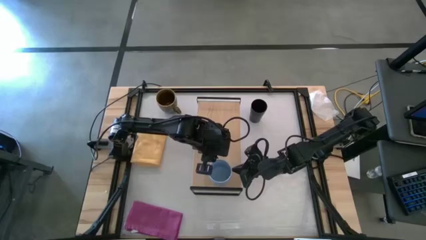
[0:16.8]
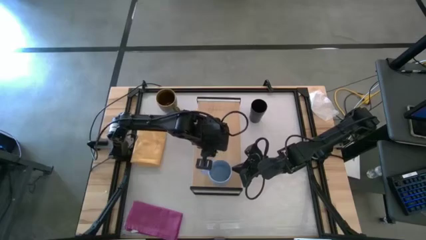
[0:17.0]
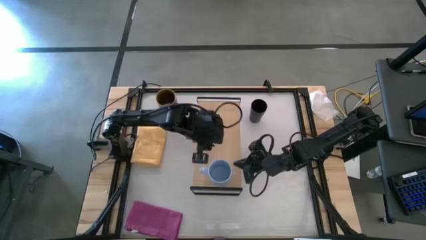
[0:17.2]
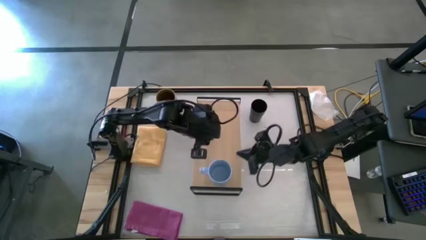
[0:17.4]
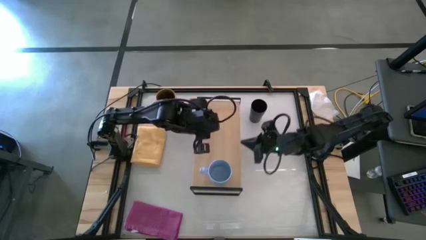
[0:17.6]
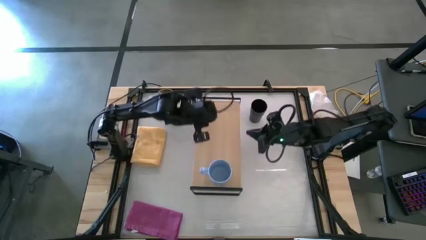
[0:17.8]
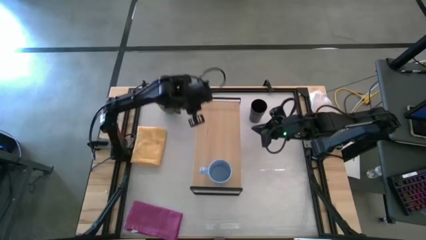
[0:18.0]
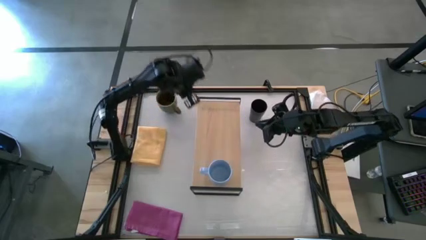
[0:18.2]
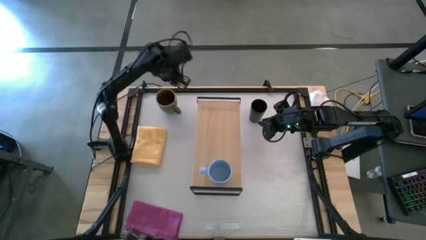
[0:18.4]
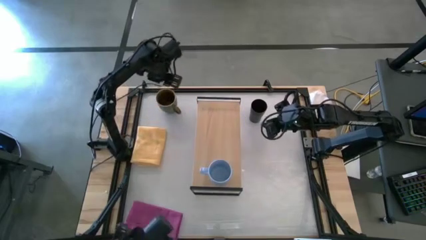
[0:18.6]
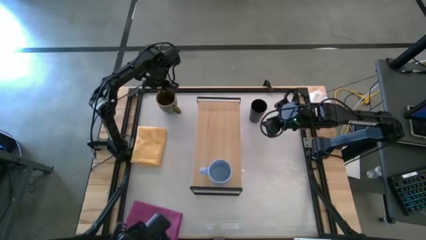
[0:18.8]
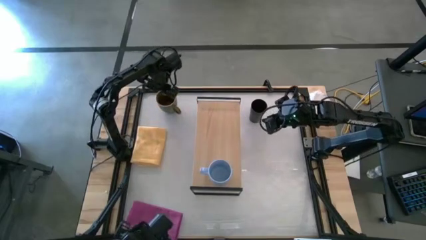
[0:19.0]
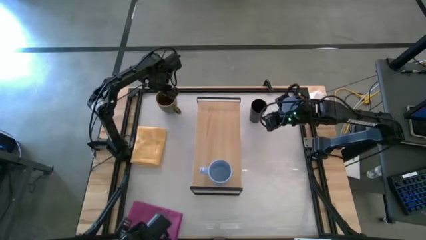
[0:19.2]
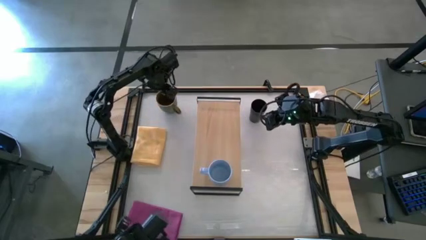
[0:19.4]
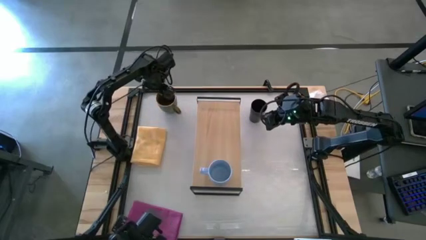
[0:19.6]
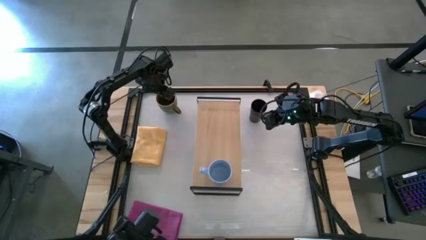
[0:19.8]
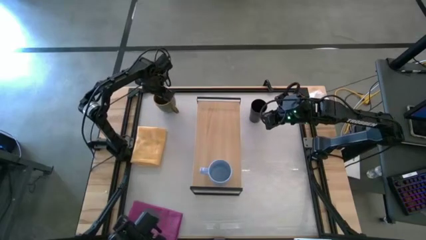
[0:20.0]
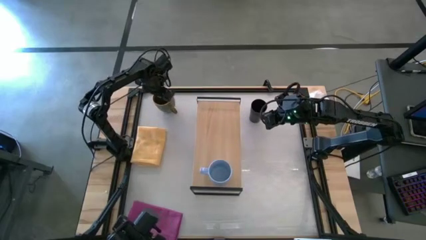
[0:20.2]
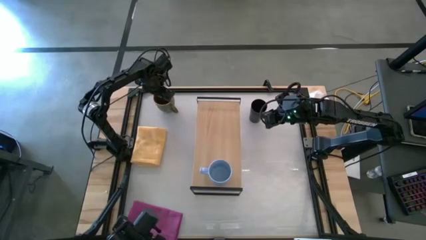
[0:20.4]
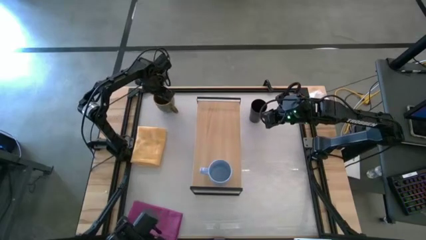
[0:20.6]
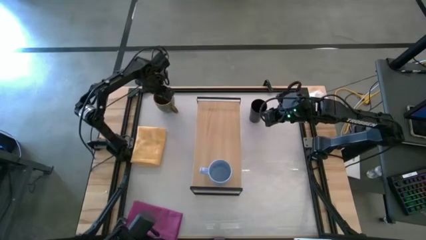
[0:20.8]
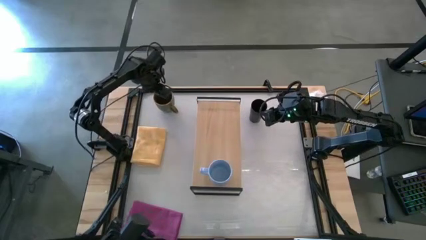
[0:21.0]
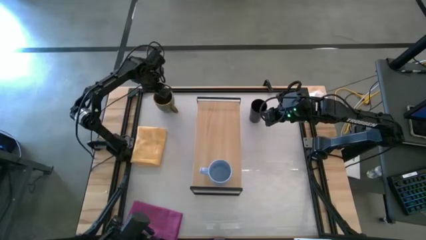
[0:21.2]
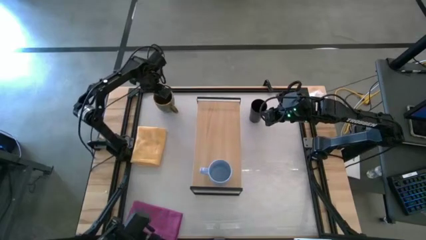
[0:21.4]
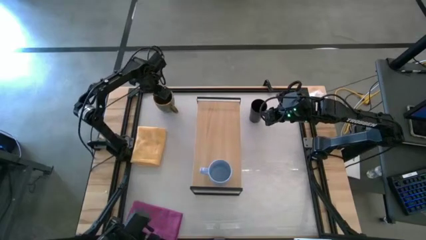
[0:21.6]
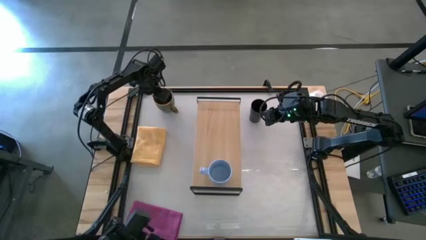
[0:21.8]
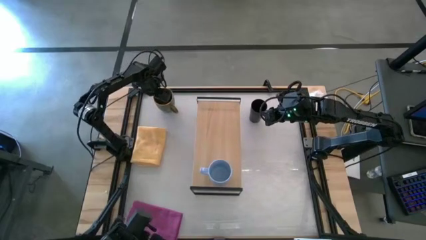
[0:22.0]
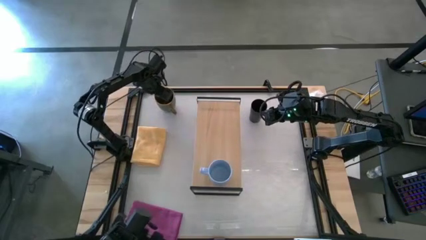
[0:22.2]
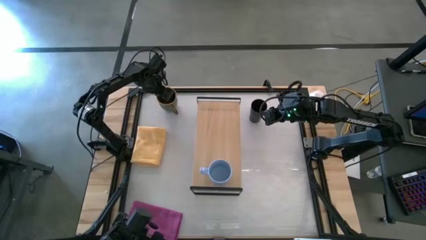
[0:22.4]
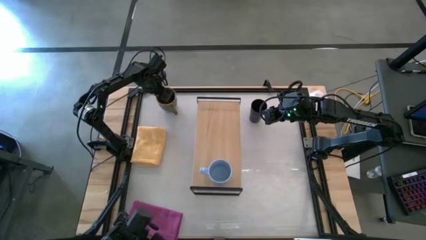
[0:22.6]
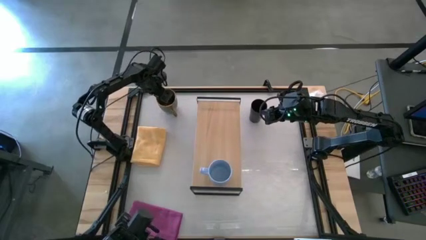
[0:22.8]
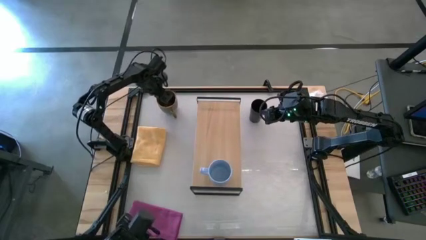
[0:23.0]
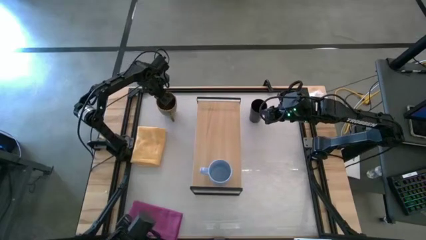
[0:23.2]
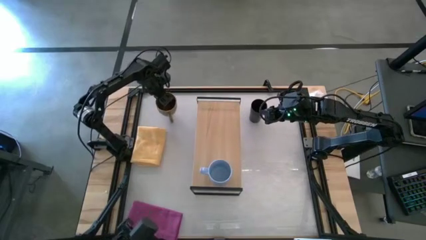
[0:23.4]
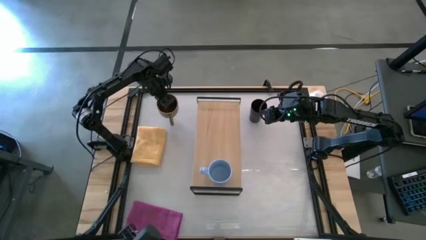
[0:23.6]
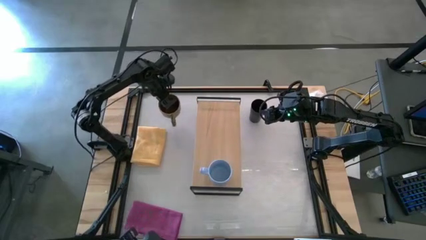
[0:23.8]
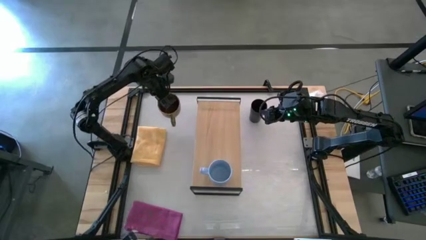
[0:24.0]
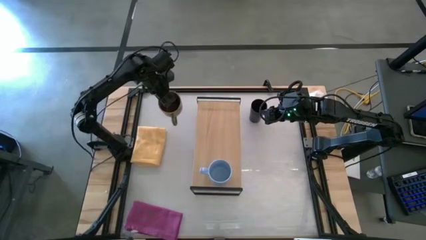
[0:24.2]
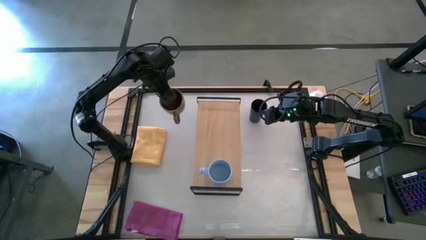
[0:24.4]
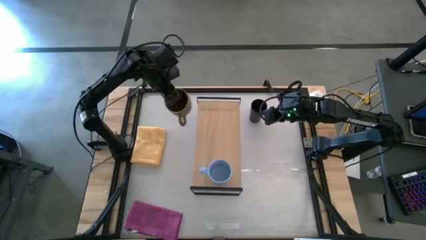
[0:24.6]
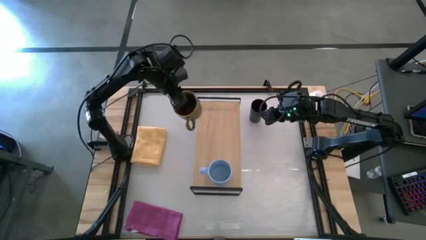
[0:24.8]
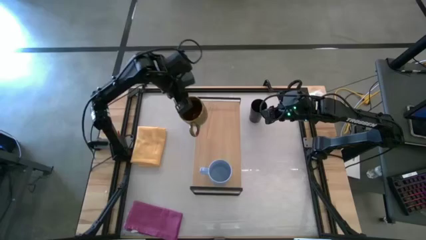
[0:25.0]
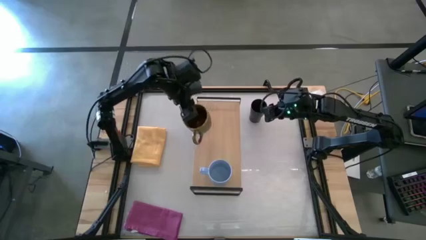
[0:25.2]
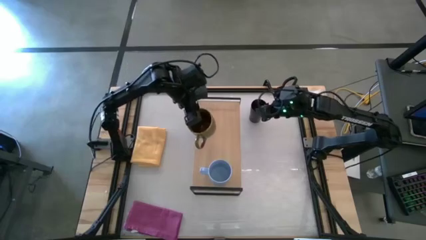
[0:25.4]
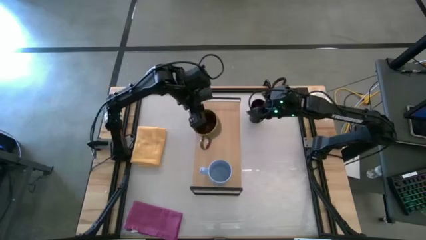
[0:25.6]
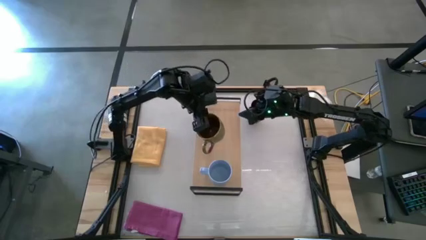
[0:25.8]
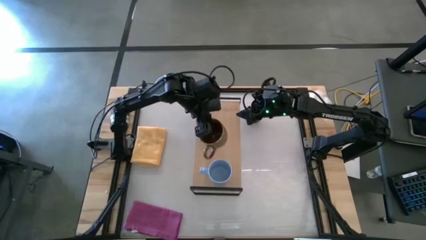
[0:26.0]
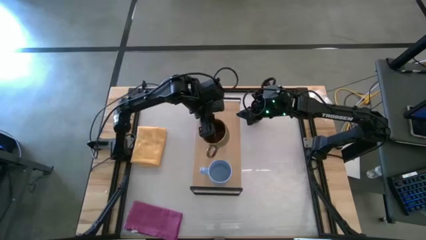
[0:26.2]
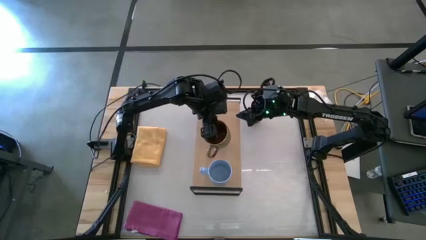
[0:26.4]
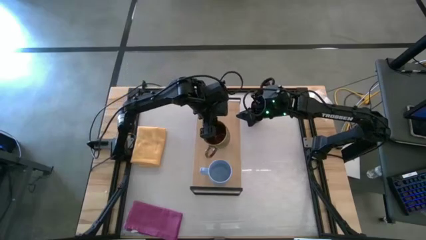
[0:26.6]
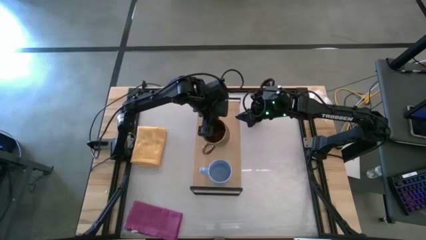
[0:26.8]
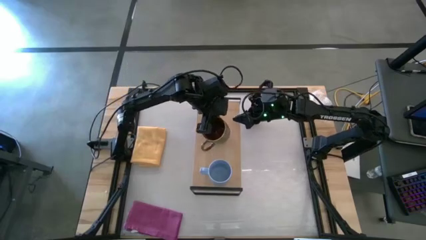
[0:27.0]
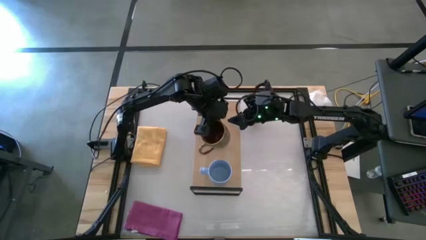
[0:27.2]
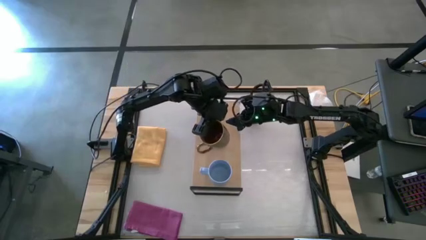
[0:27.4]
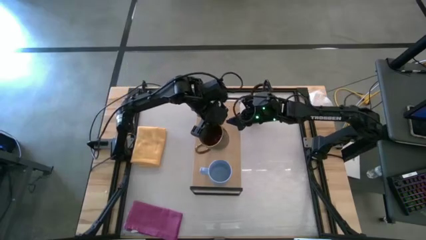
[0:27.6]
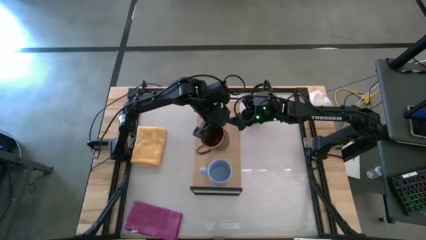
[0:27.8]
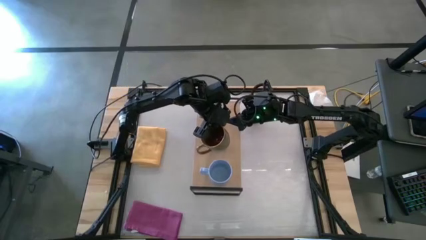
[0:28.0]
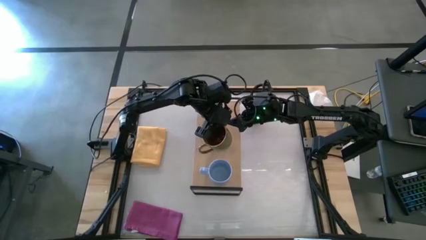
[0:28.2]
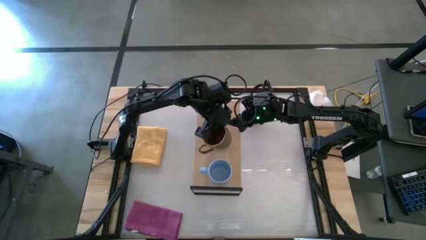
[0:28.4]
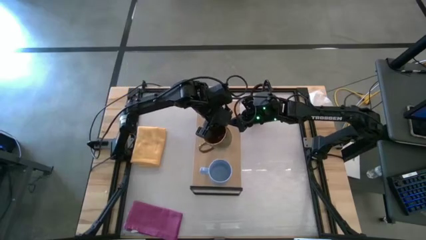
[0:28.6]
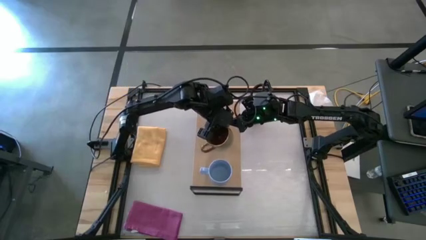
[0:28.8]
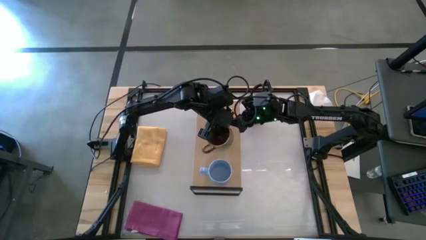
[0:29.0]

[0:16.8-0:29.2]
Task: Stack small to large cups/mugs on shelf
Put the green cup on the shelf
